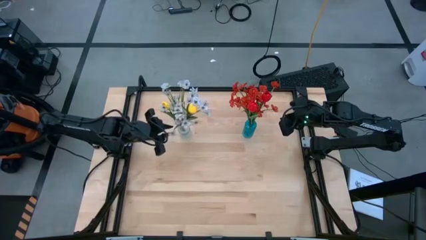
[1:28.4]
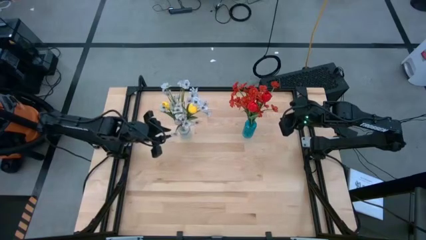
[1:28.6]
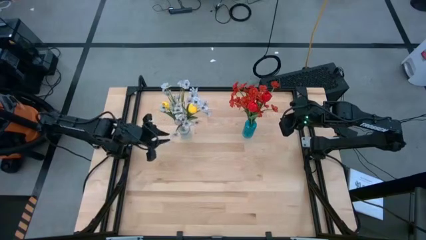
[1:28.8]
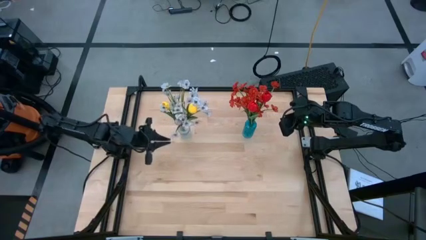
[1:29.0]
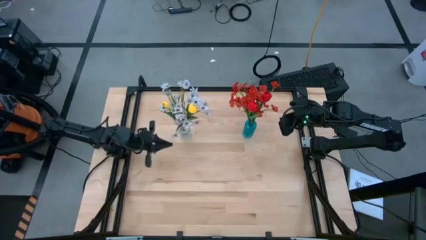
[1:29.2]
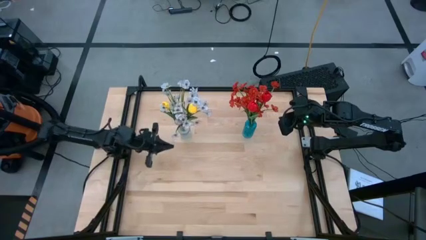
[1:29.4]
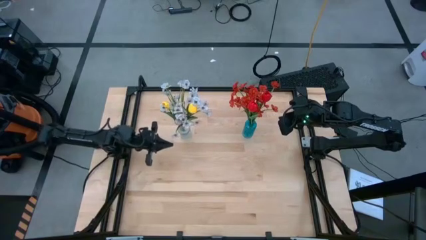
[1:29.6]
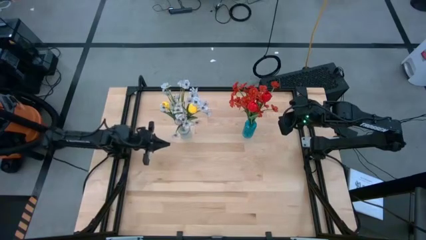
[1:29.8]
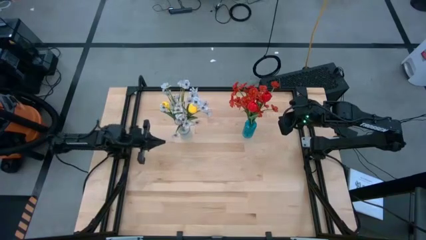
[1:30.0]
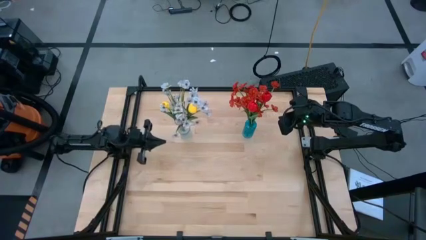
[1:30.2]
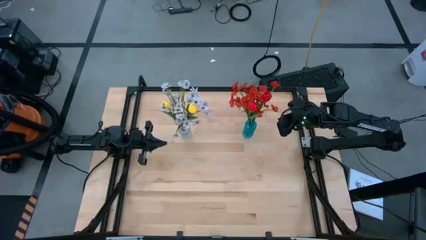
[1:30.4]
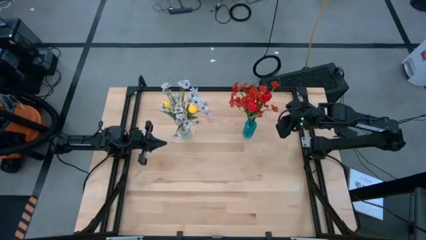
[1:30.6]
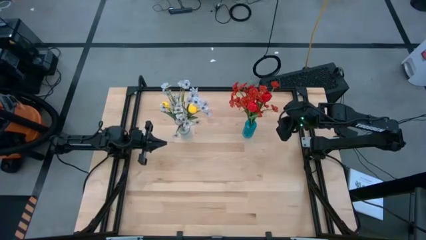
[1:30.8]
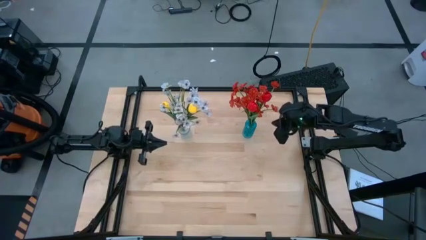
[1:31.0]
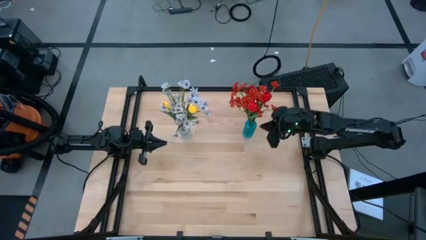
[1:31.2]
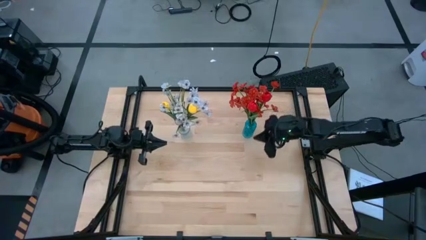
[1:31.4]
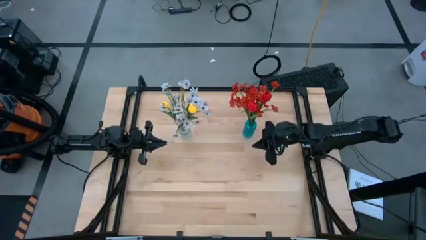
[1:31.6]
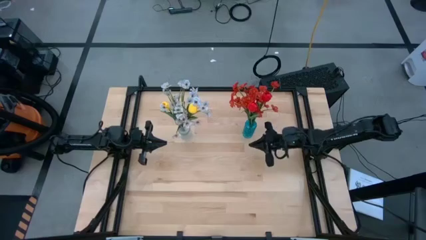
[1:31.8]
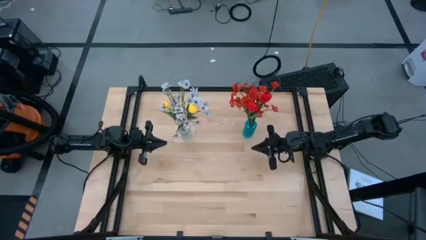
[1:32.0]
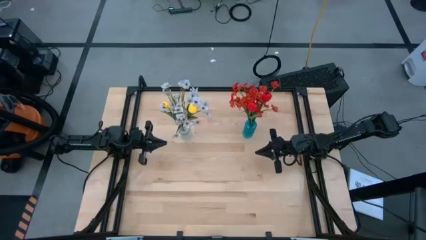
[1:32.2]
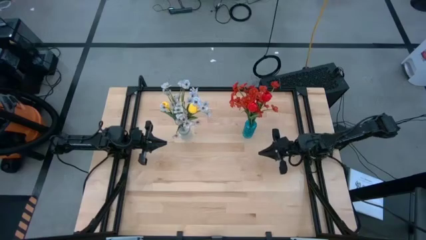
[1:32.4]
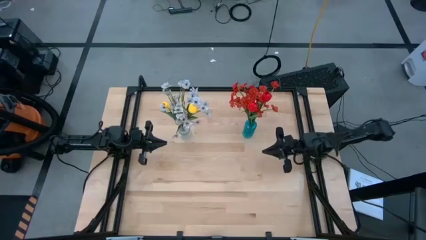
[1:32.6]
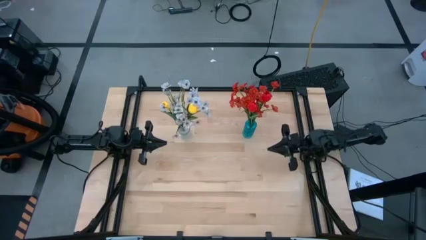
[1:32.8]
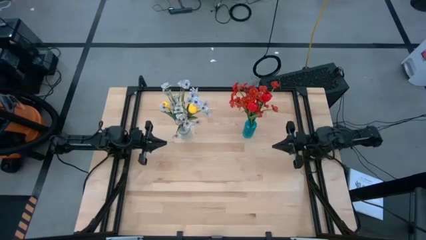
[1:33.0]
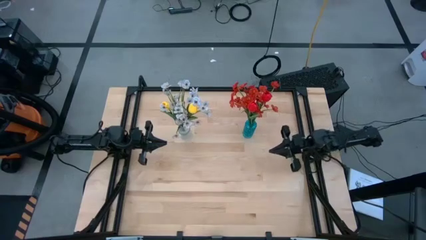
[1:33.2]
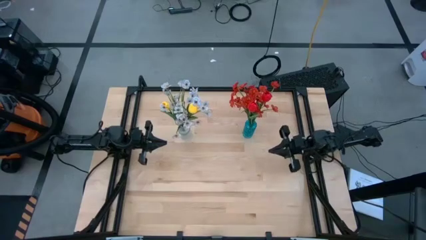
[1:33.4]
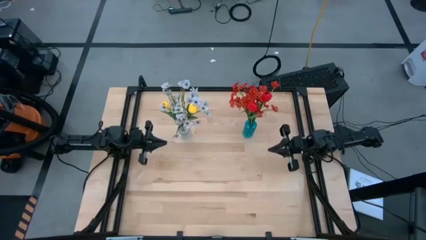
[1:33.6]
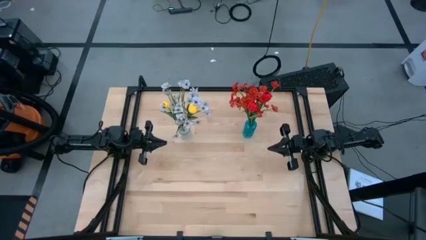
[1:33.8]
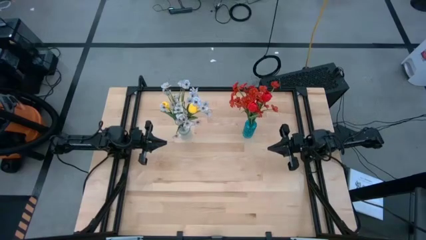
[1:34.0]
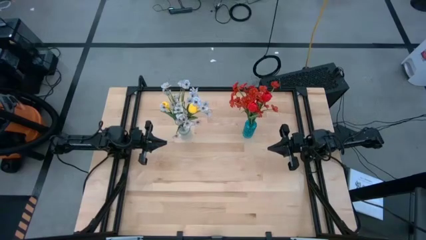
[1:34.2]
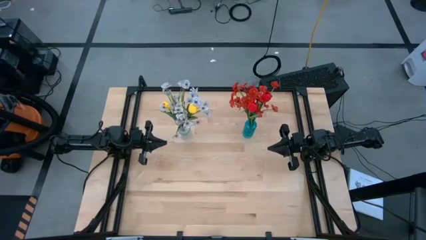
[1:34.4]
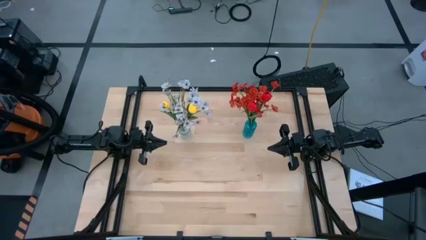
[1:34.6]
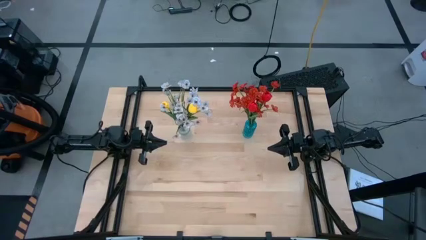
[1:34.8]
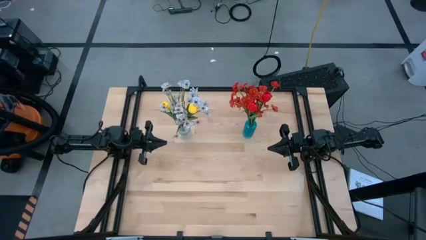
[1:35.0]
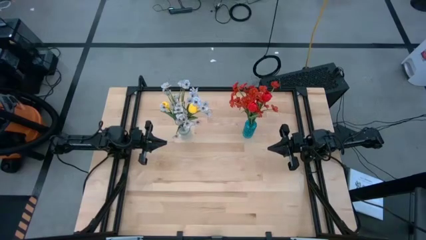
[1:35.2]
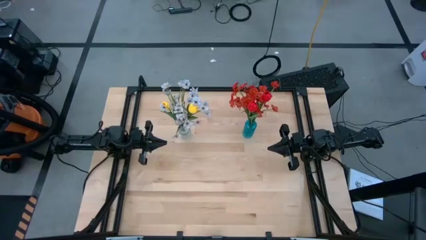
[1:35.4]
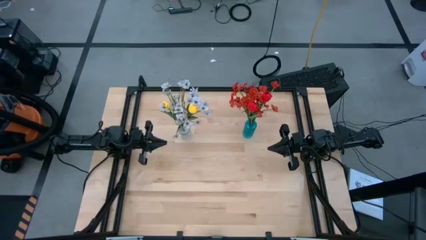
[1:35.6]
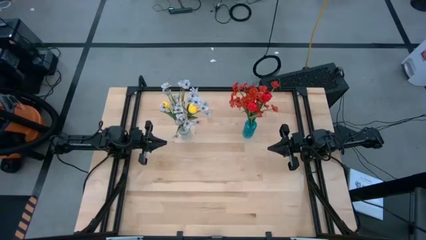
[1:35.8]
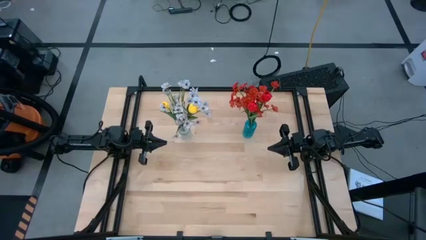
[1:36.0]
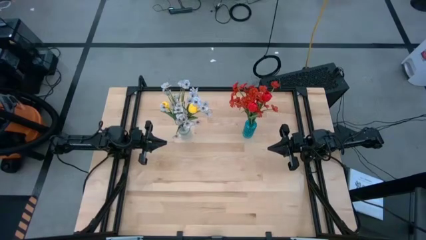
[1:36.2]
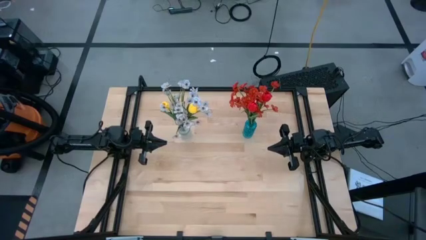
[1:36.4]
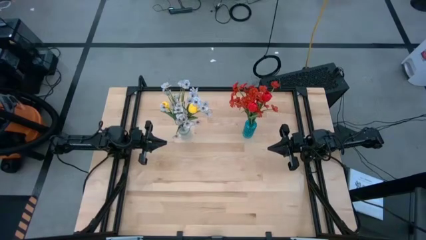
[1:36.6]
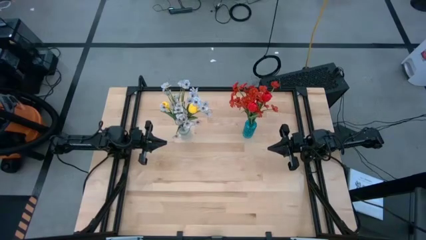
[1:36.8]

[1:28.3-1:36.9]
Task: Sort flowers into vase by color
Return to Home Position

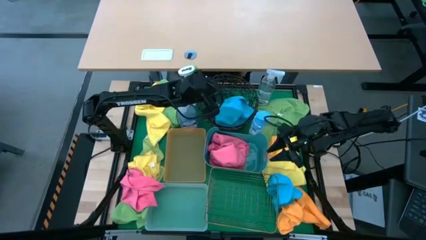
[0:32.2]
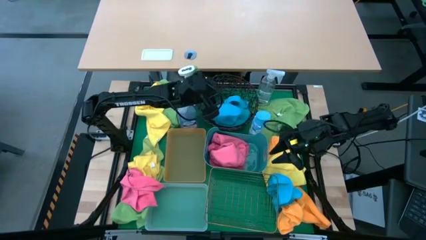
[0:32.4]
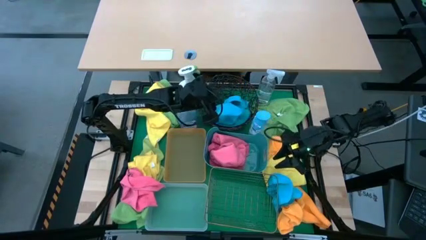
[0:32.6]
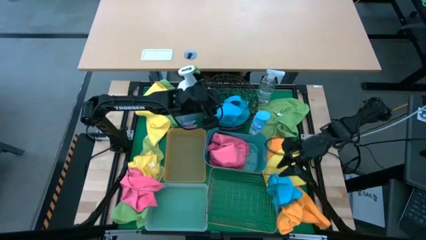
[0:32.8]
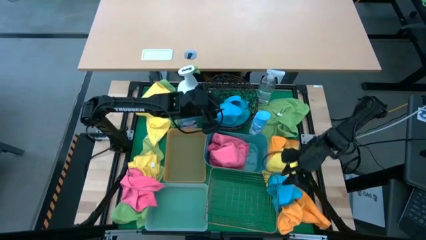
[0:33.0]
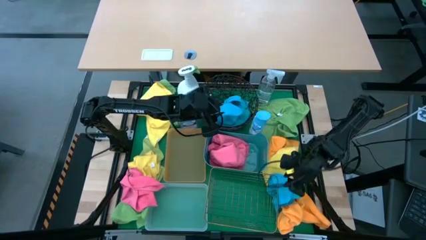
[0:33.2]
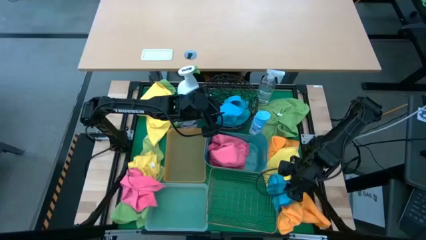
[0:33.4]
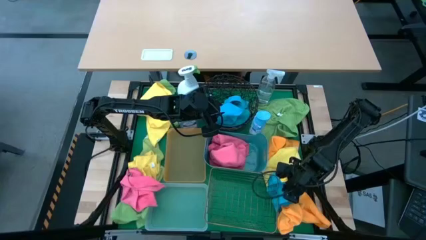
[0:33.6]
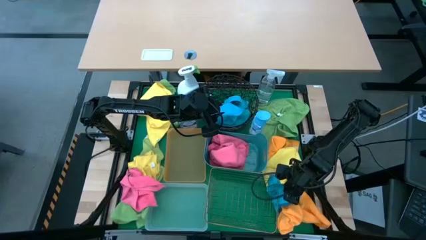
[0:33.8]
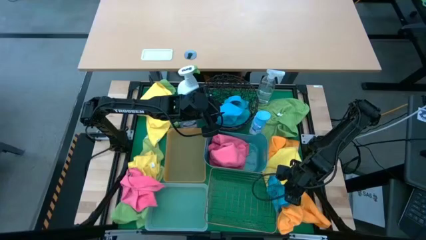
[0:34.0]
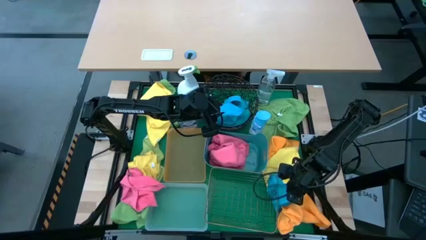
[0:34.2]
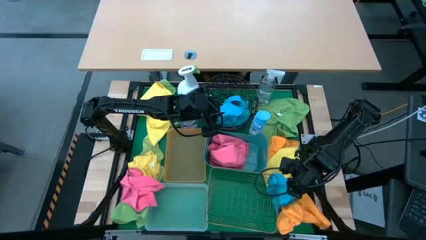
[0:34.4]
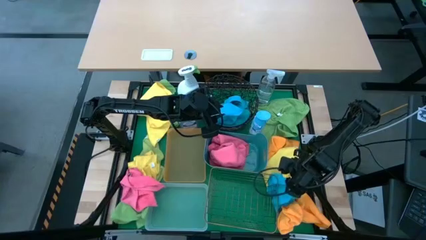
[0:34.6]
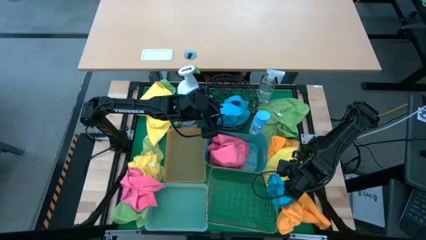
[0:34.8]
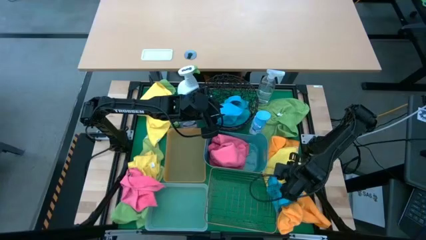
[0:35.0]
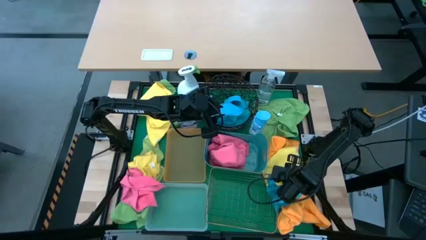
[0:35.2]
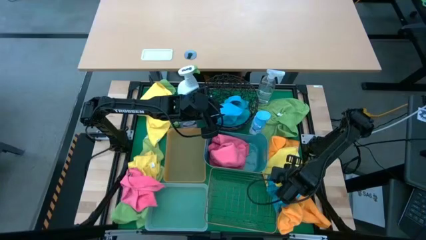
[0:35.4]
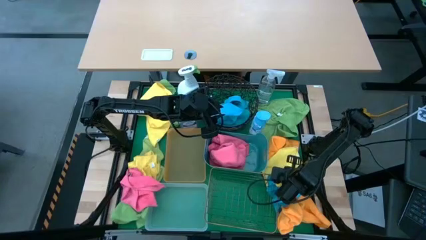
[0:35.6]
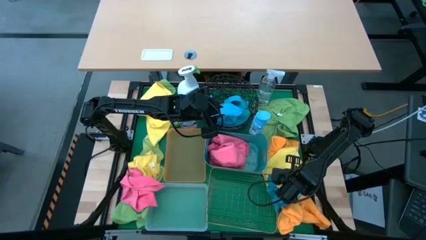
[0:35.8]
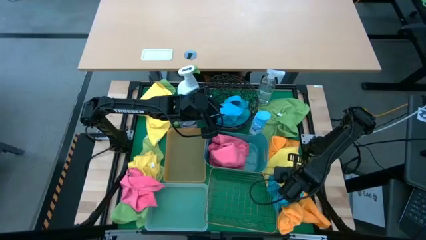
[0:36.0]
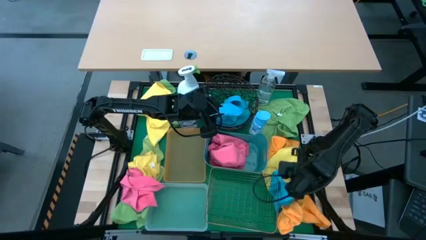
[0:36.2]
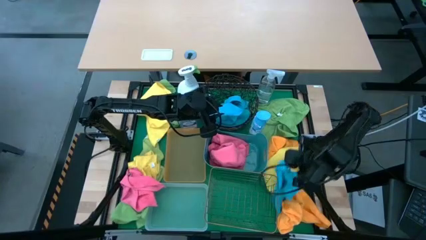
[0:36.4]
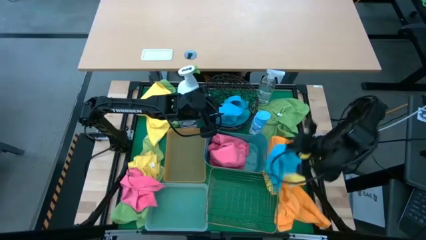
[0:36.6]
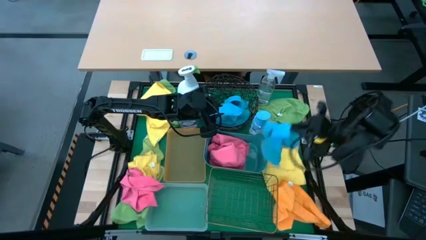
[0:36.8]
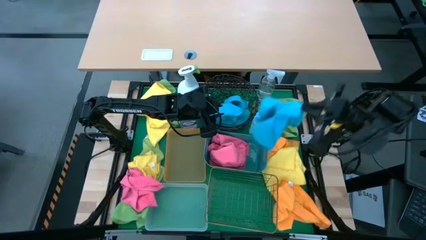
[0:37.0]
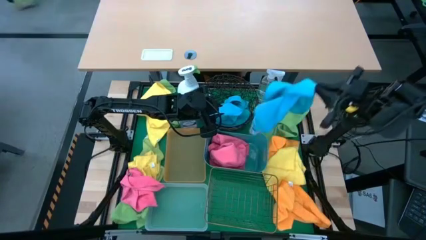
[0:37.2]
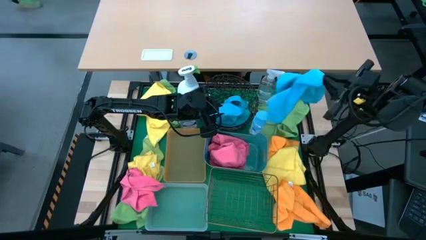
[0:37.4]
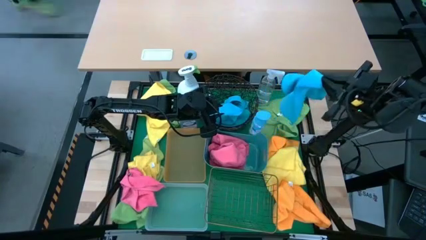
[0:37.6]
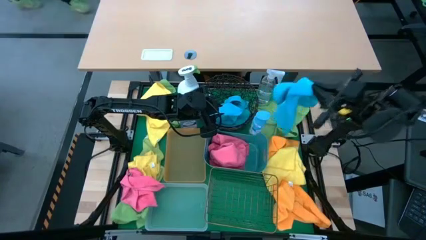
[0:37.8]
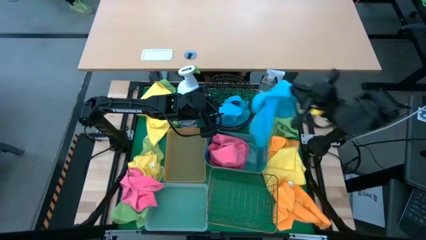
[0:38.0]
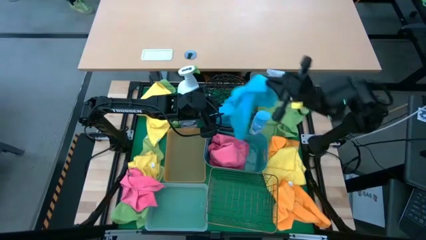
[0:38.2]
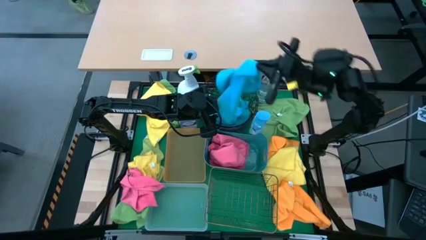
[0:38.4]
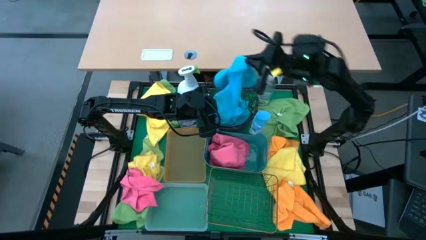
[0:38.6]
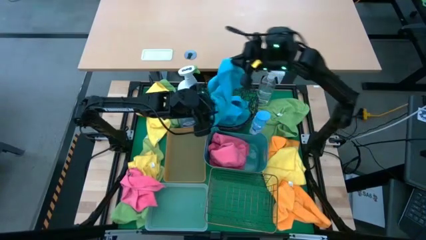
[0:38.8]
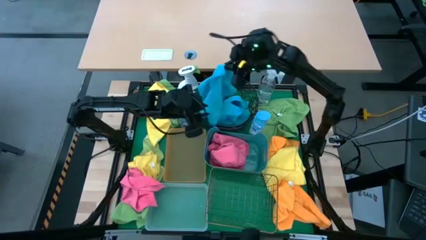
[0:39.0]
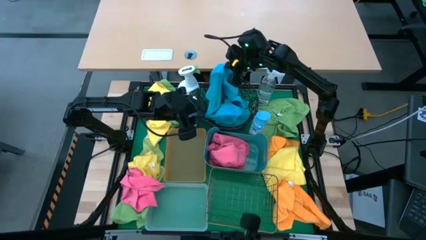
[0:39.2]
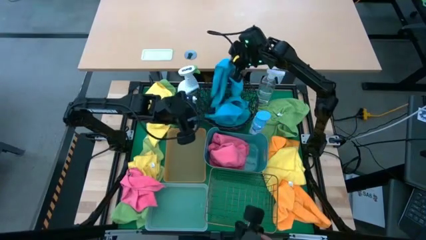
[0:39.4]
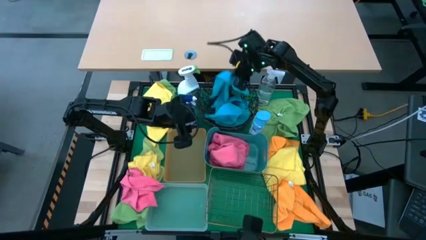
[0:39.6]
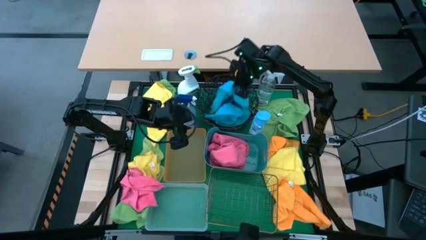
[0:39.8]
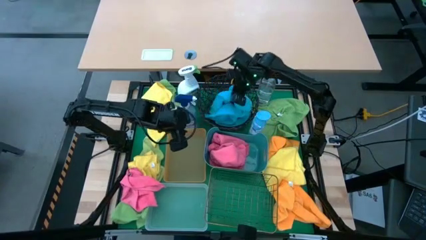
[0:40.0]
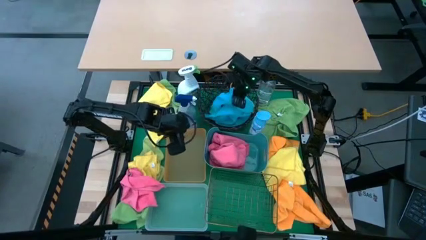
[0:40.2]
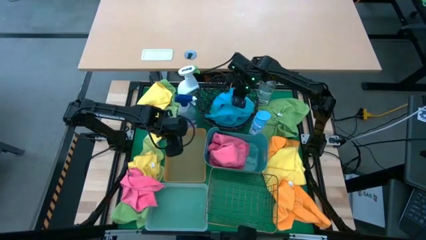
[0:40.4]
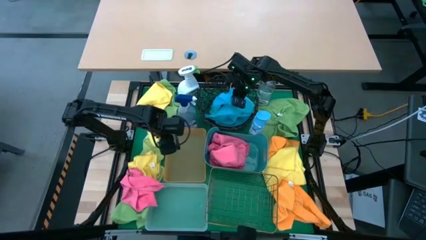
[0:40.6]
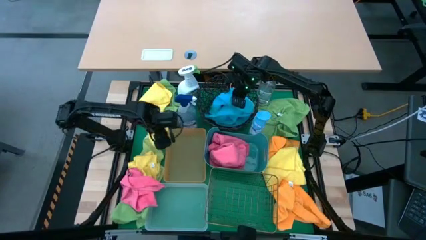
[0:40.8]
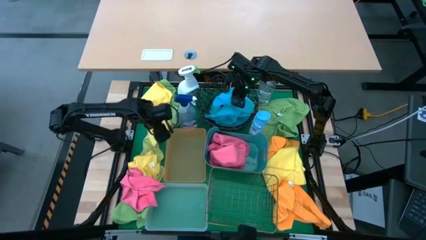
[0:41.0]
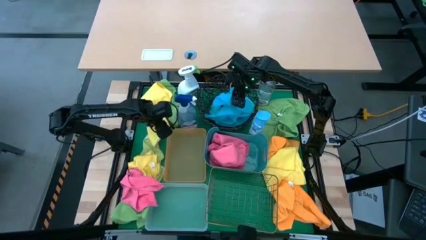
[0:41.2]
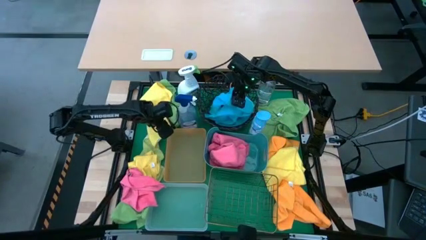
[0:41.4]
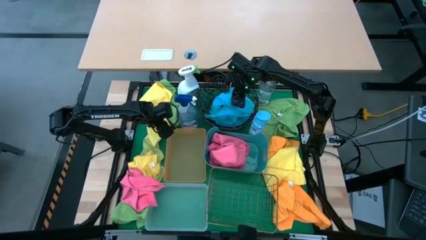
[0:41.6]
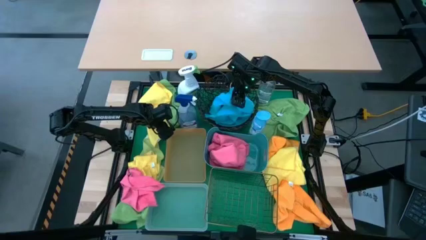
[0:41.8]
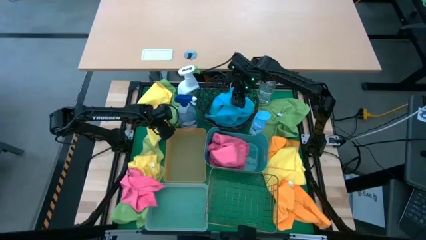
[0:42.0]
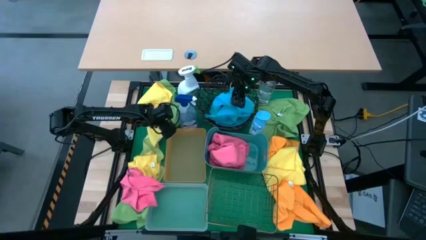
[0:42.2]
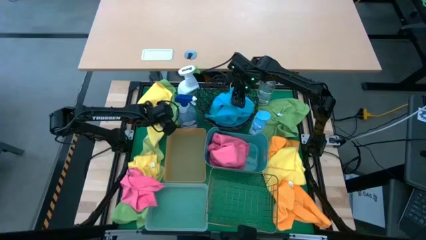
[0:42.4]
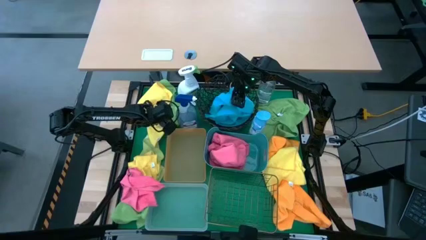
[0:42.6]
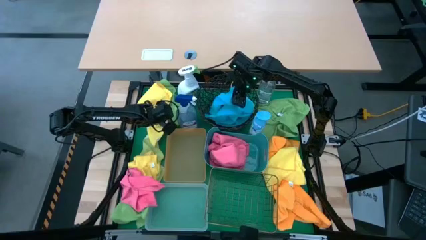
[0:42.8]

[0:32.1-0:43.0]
Task: Sort microfiber towel by color & place in baskets
Put the blue towel into the black circular wire basket
